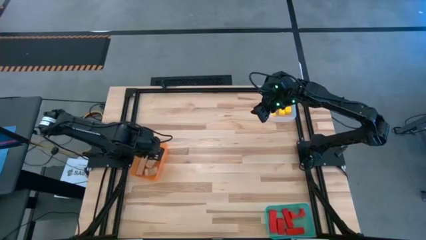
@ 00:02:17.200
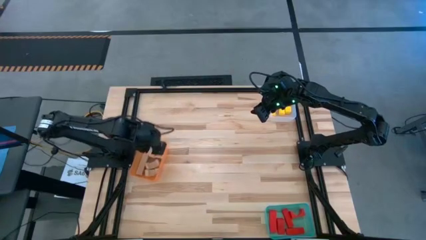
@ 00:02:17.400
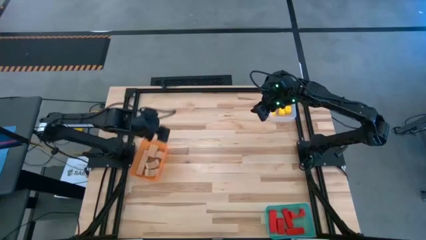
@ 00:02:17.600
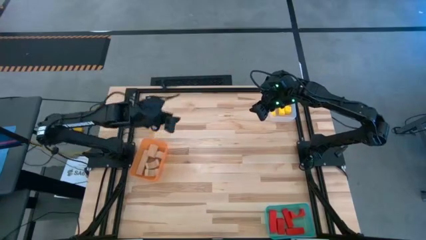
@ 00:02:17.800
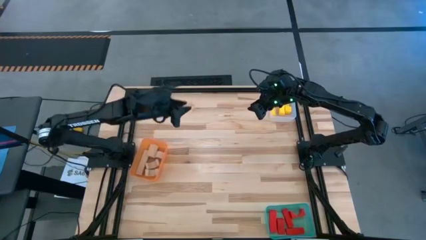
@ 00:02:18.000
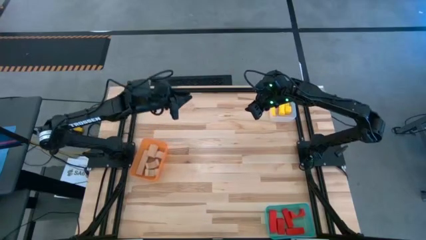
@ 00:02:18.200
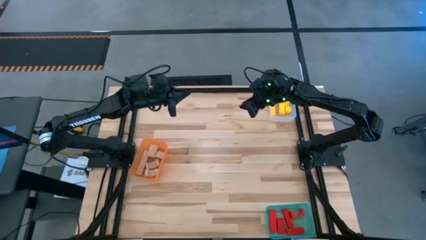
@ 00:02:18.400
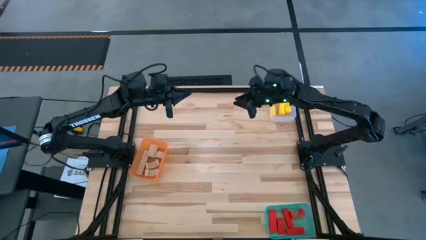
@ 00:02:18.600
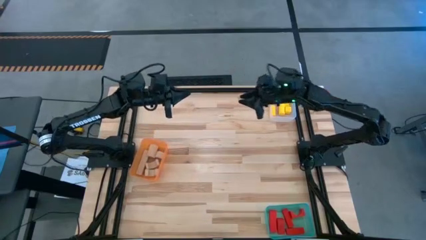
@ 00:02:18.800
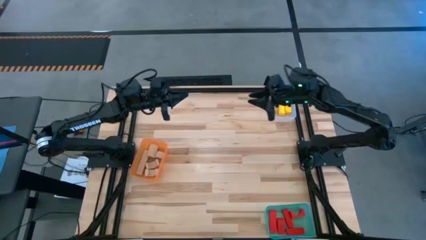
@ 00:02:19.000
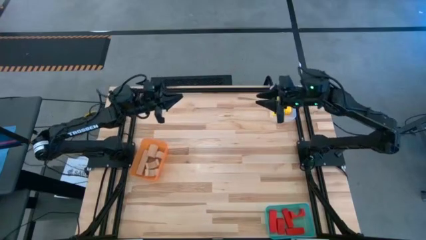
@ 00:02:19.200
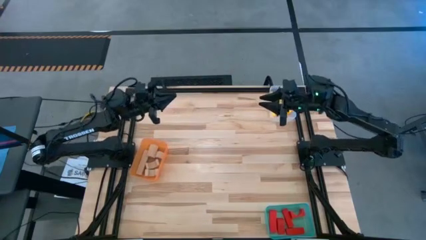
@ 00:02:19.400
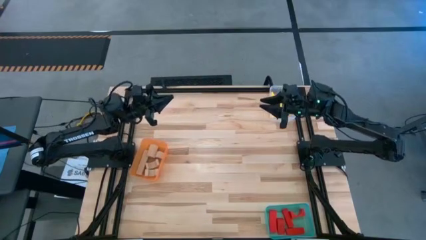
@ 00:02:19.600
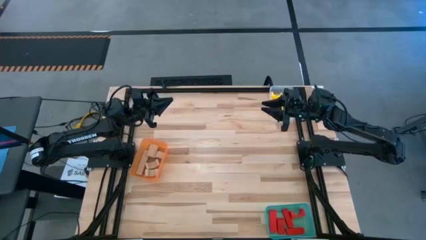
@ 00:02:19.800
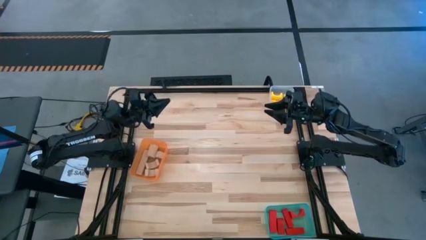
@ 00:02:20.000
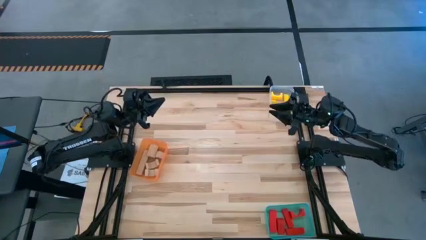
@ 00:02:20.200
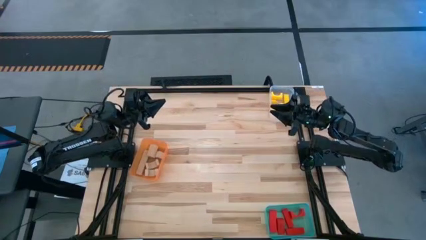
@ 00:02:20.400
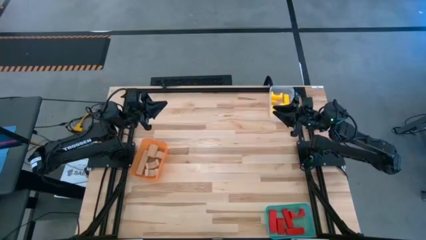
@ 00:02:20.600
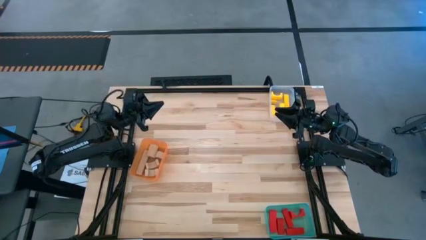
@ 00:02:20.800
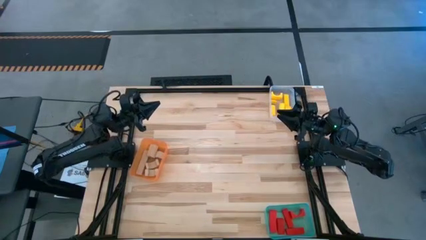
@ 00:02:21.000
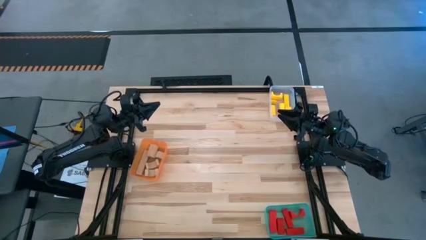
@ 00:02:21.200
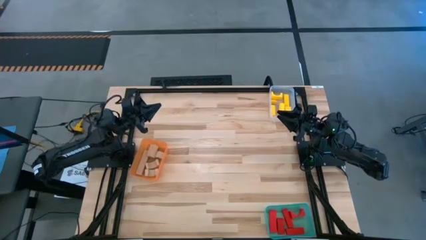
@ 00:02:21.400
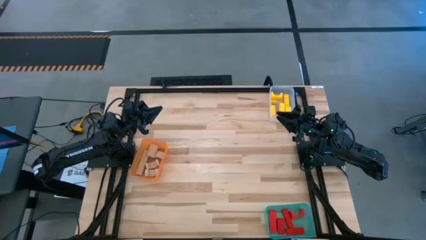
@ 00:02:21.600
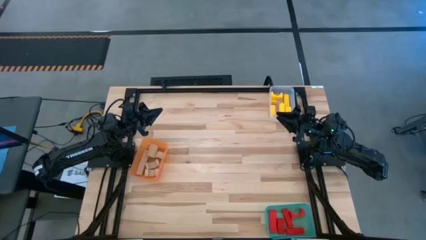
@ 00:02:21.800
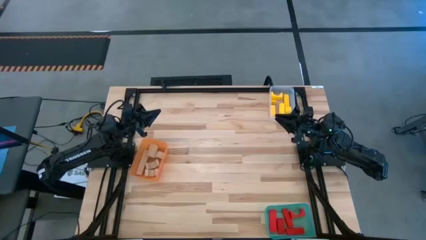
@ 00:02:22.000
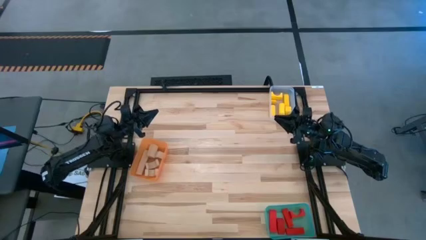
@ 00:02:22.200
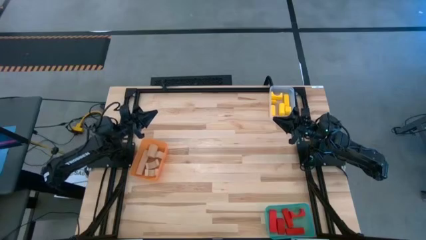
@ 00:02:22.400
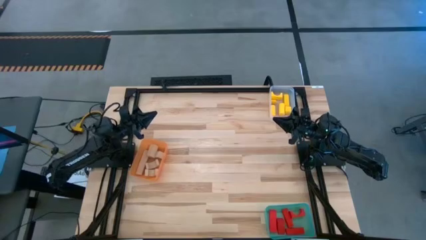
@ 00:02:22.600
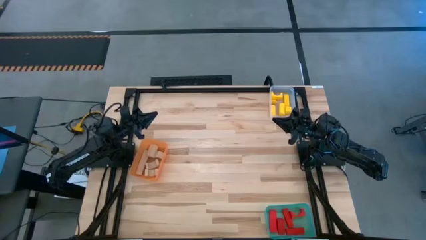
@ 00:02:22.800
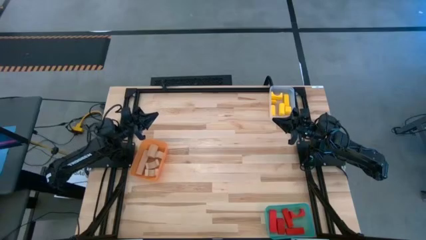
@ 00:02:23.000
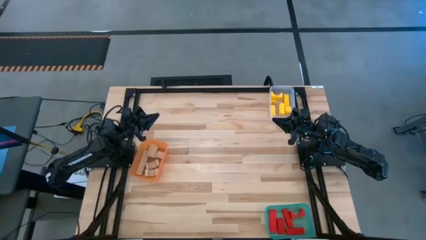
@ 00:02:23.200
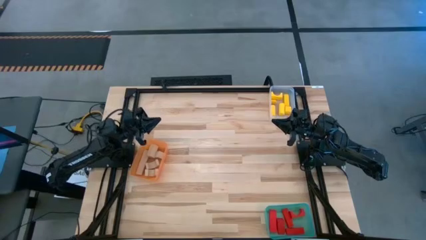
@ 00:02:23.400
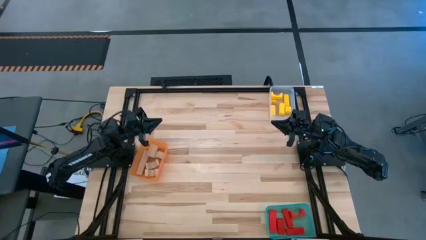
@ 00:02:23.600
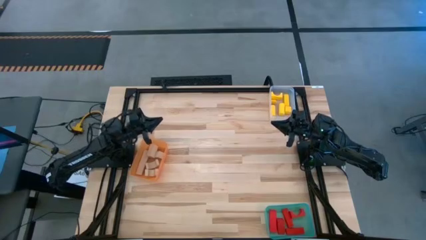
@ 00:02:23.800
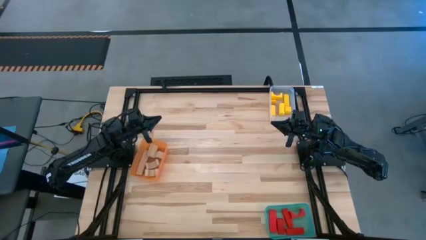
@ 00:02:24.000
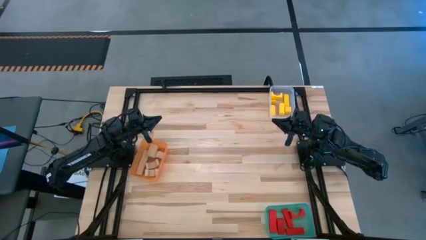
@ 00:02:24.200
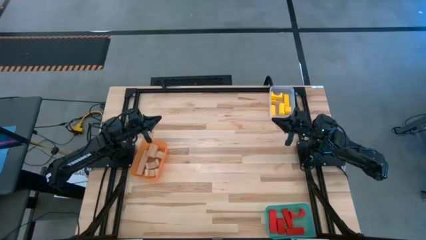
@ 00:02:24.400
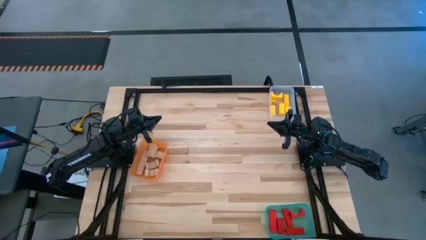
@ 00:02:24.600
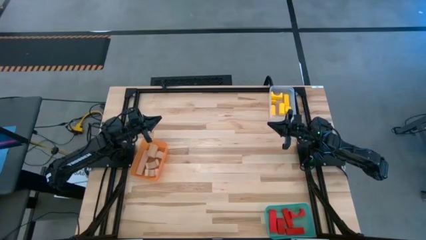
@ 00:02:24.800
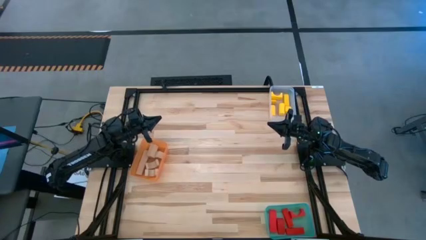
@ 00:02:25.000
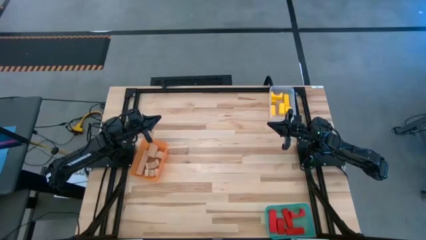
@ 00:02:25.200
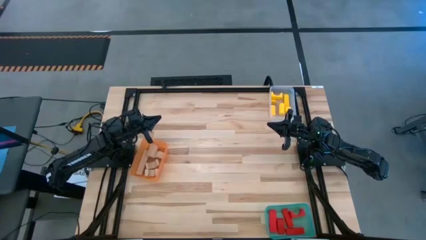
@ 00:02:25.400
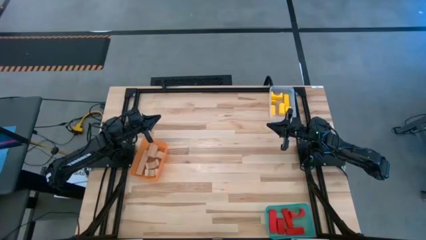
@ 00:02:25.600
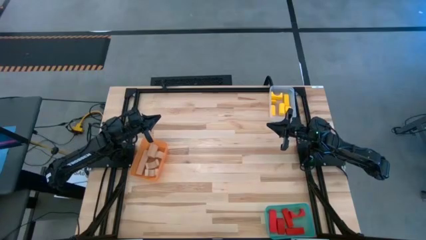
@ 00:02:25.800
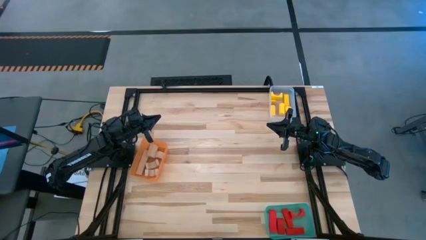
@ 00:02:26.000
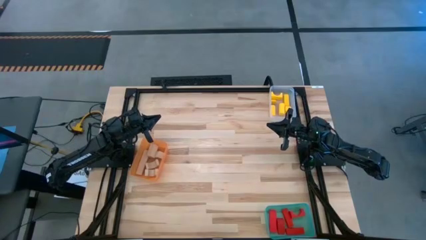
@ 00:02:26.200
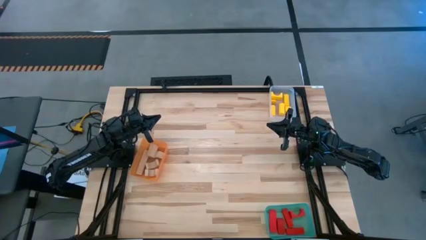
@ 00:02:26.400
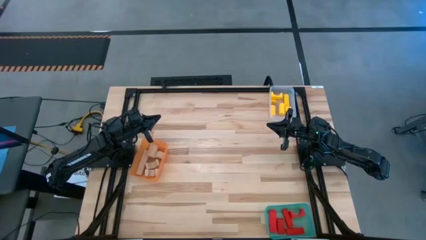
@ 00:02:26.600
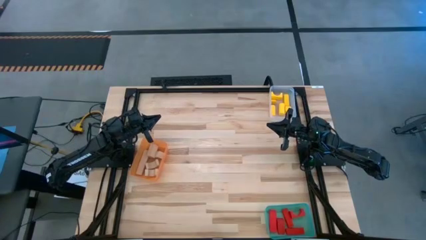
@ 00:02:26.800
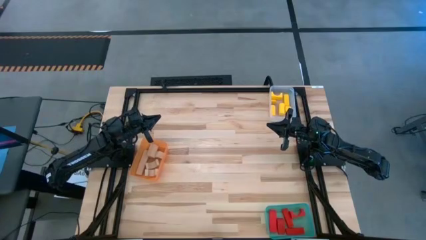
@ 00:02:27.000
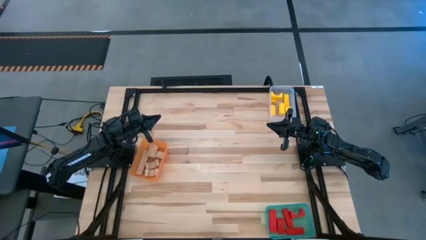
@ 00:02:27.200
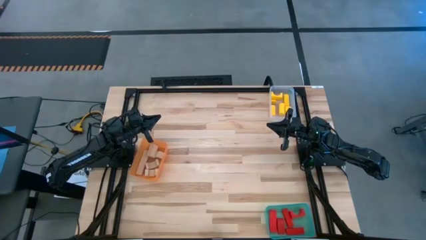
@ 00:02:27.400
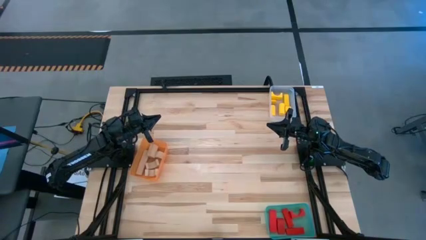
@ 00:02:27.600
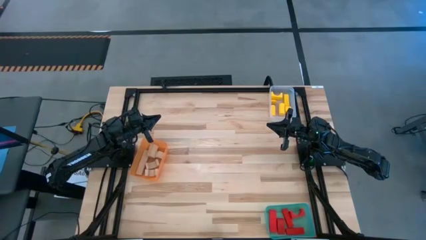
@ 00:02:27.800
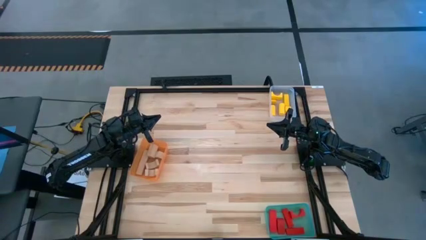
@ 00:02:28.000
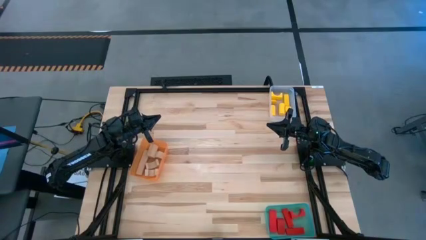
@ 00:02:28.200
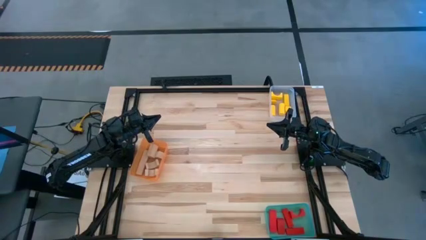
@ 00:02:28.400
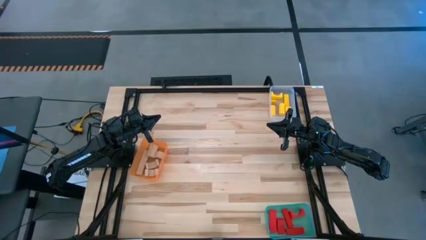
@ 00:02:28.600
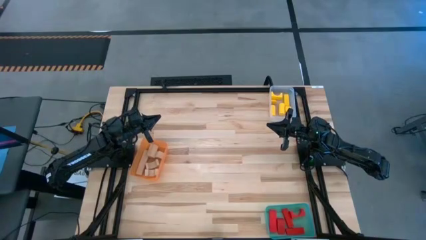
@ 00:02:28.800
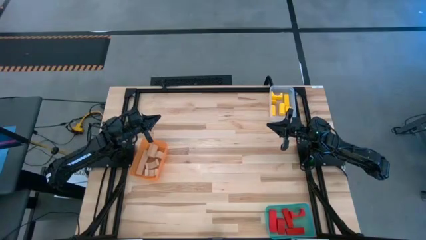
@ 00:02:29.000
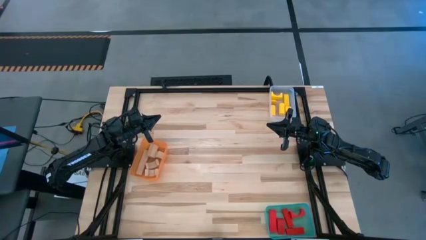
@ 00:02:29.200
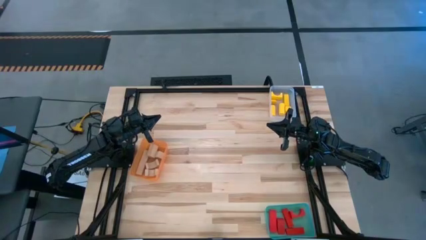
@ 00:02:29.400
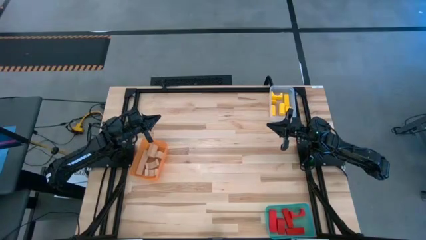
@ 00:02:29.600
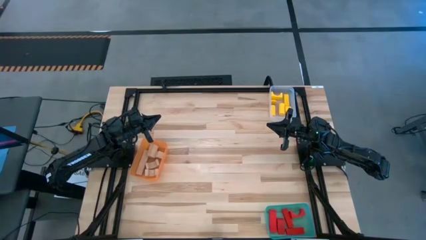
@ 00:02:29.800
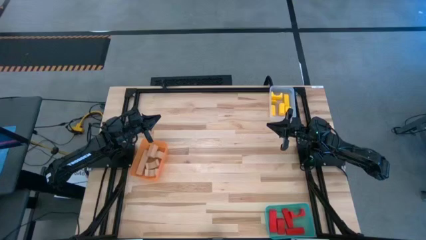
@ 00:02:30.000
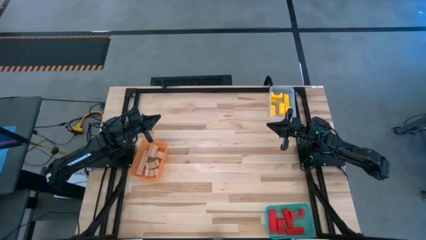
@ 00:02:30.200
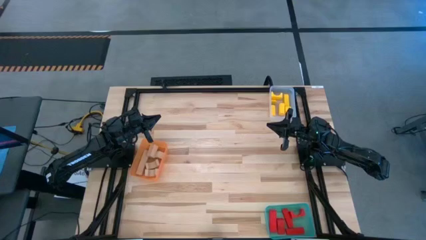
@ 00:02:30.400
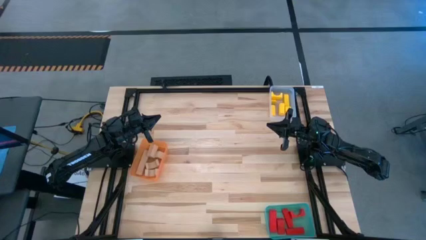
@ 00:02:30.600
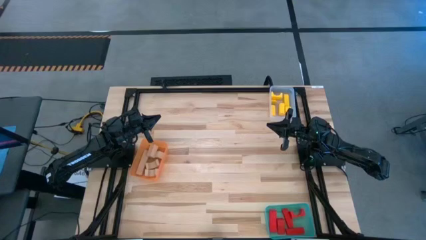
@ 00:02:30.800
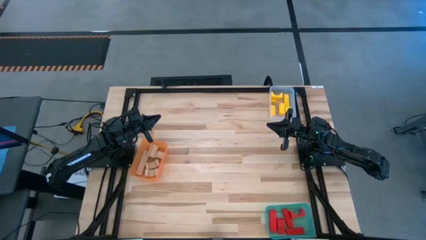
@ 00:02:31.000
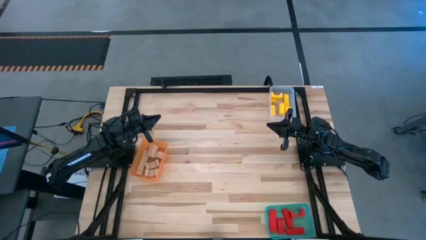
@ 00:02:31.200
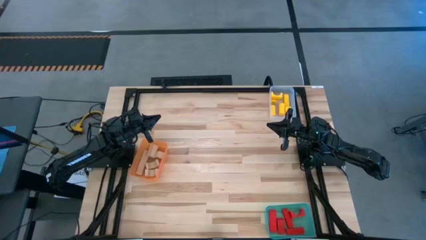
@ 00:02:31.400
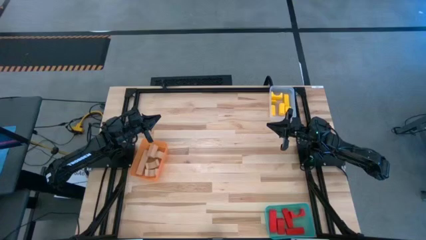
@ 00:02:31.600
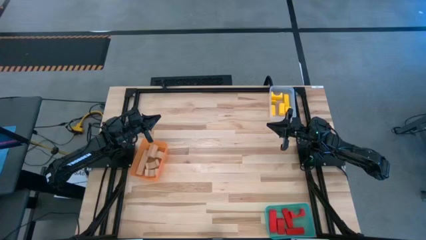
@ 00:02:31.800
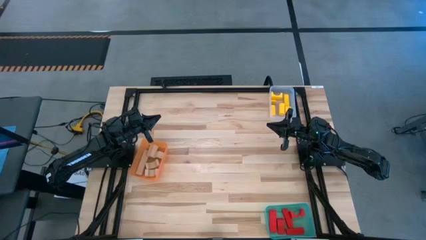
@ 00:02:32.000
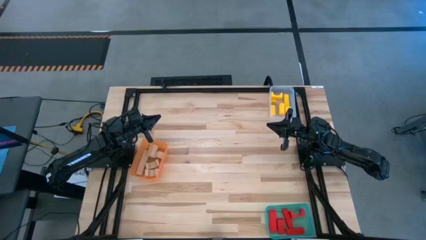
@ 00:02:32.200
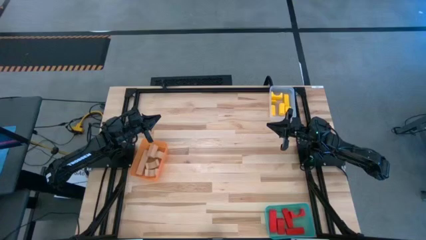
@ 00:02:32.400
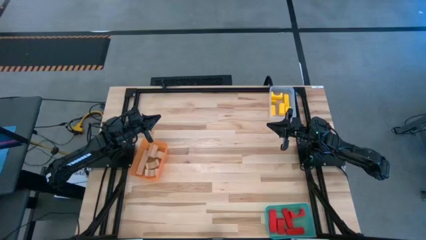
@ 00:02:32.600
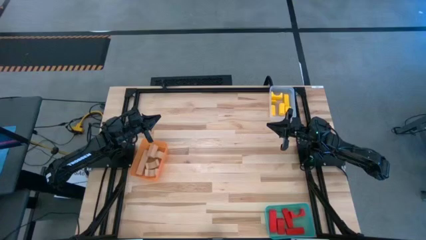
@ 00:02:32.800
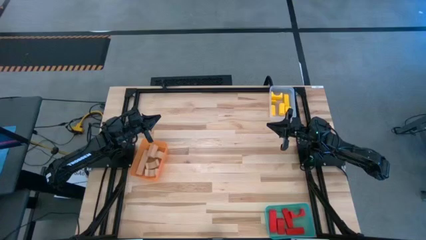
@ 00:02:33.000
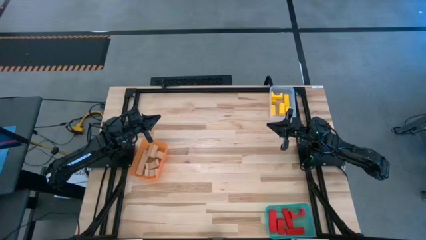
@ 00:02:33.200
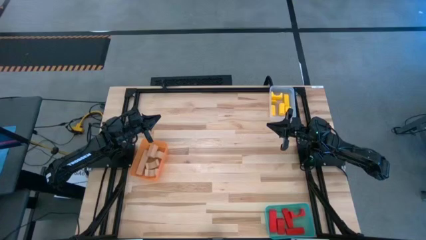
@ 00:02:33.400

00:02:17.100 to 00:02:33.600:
Task: Sort & place blocks by color
Return to Home Position
